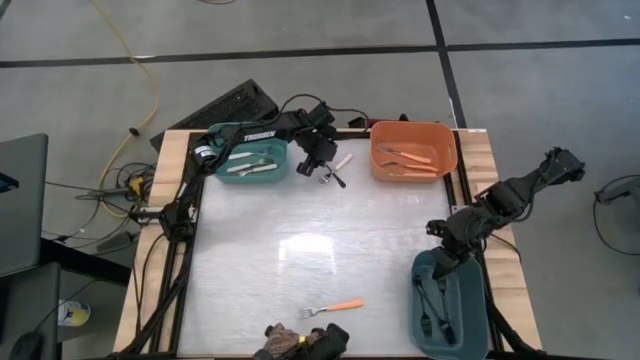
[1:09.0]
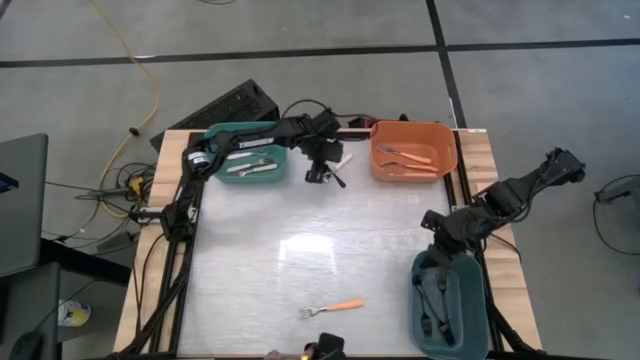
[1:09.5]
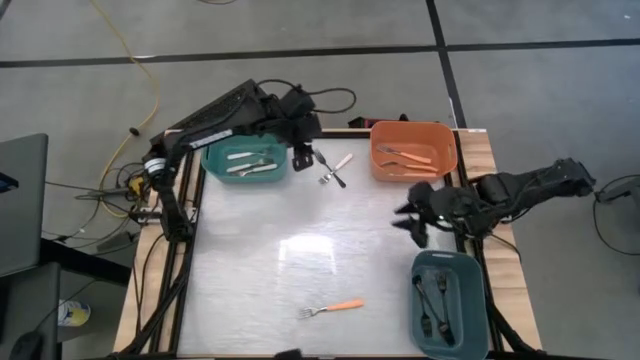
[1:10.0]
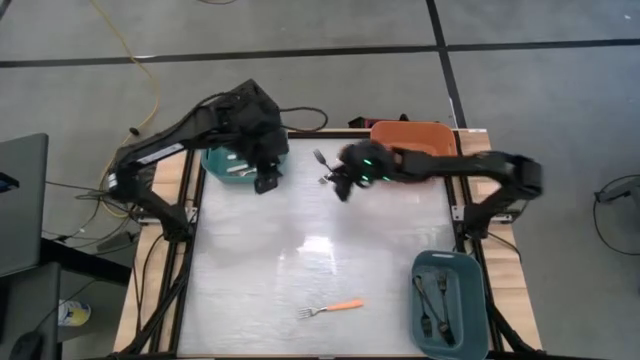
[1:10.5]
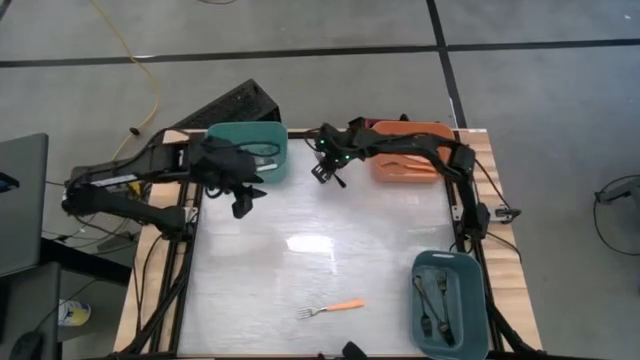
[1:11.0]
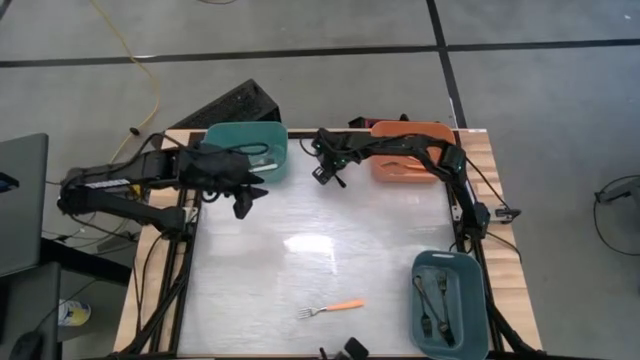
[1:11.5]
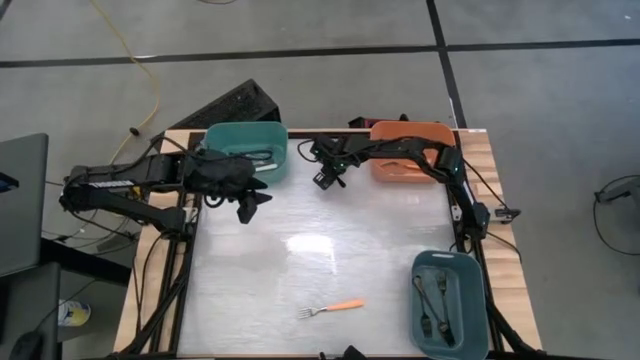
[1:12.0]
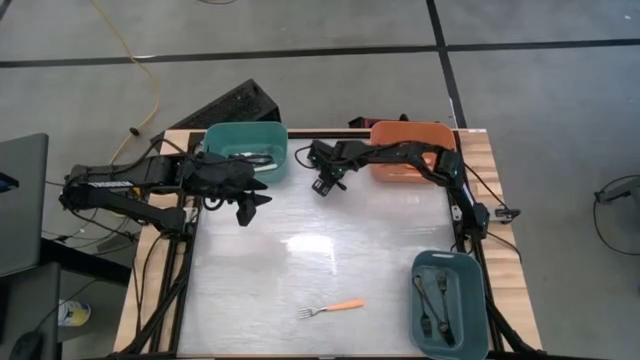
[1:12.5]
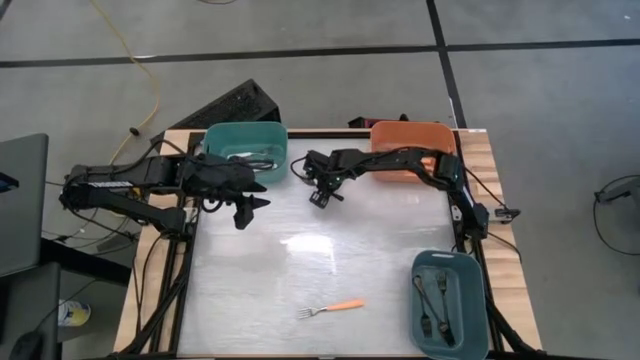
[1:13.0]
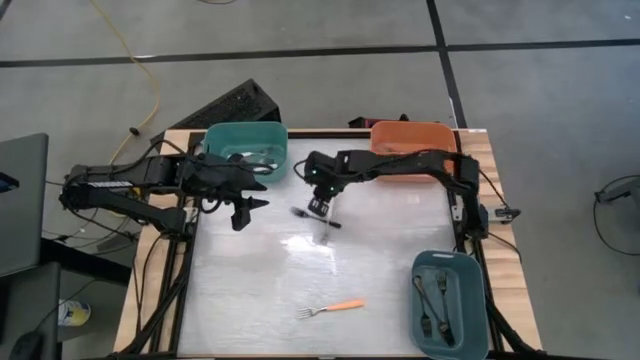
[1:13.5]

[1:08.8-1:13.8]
Task: Sort silverware by color (type)
Put the black fork into the blue bin

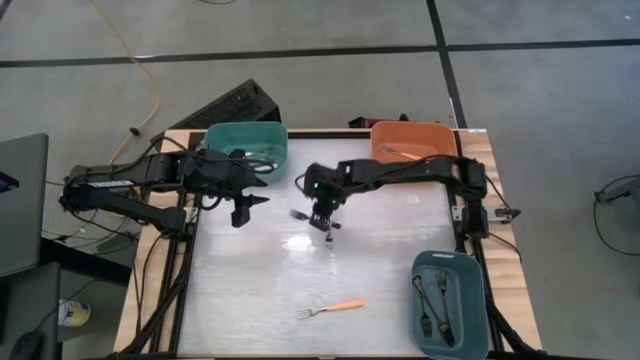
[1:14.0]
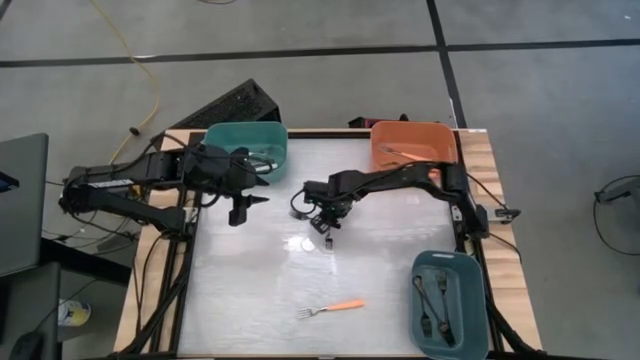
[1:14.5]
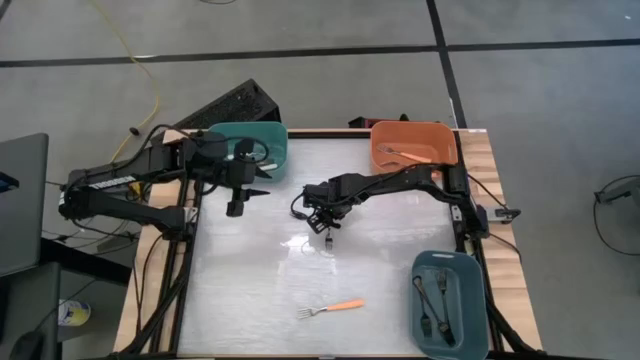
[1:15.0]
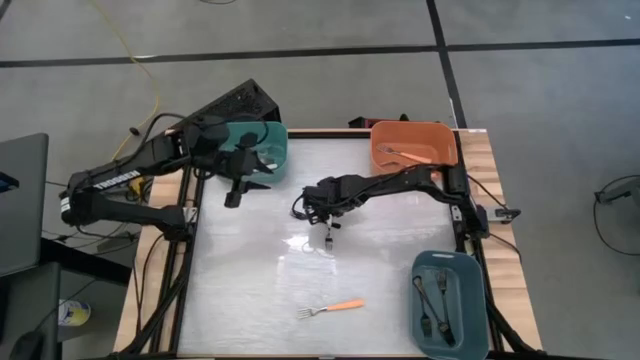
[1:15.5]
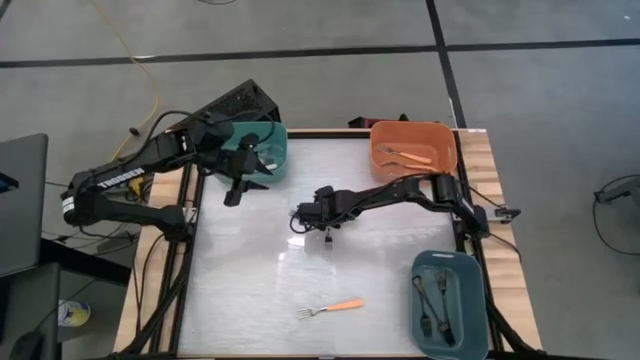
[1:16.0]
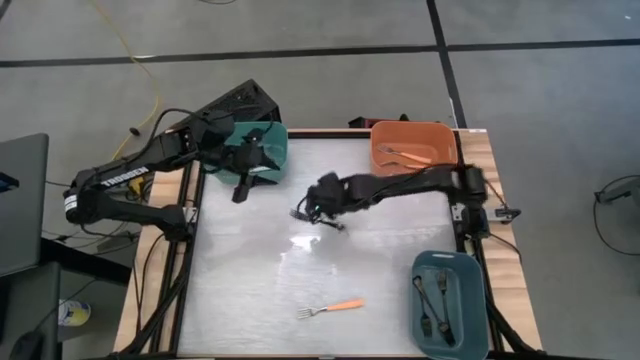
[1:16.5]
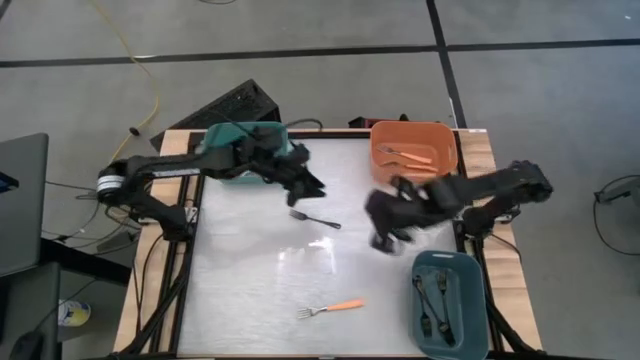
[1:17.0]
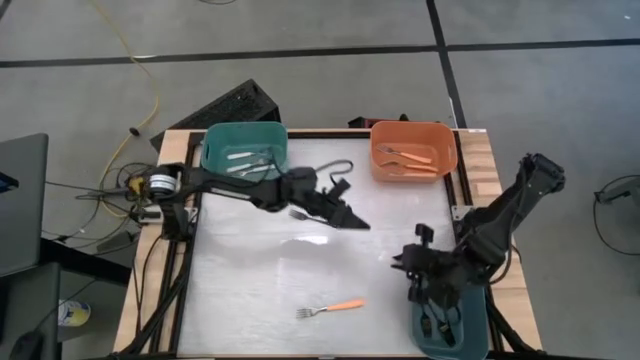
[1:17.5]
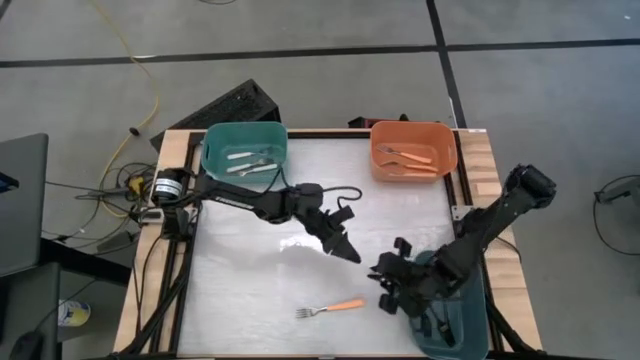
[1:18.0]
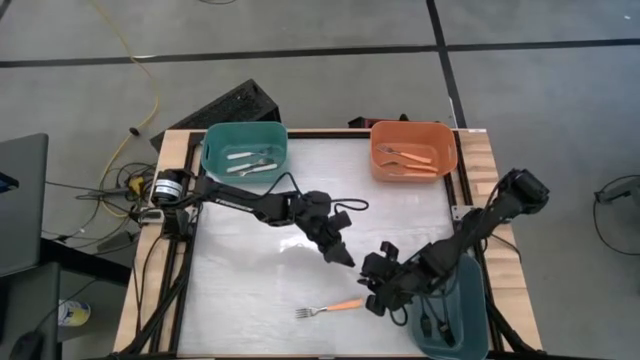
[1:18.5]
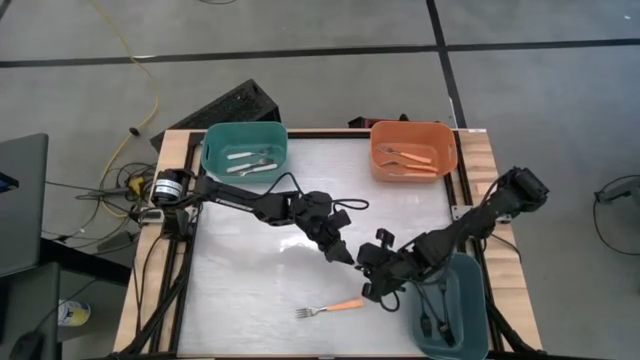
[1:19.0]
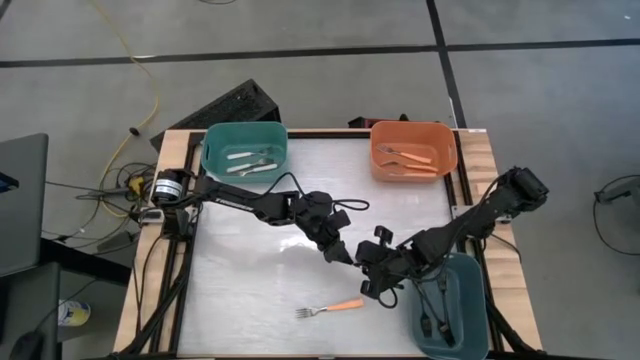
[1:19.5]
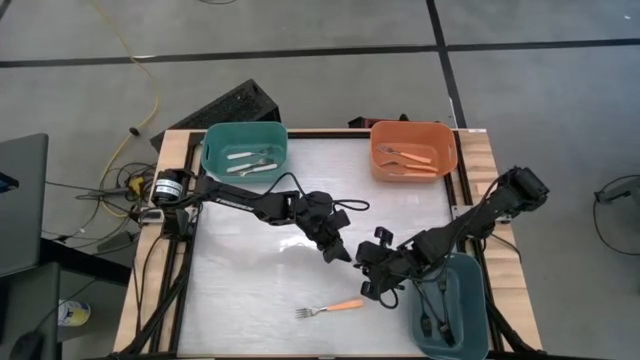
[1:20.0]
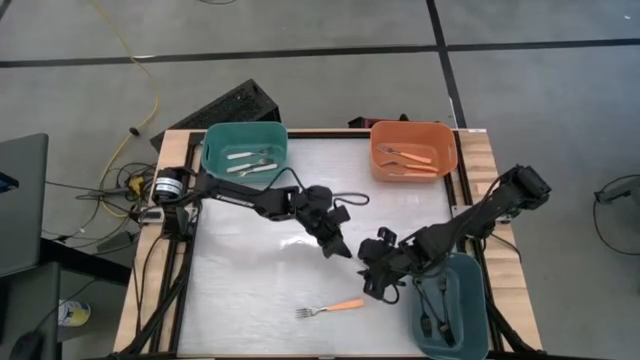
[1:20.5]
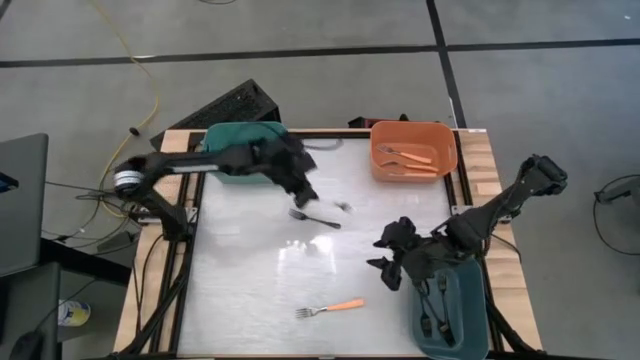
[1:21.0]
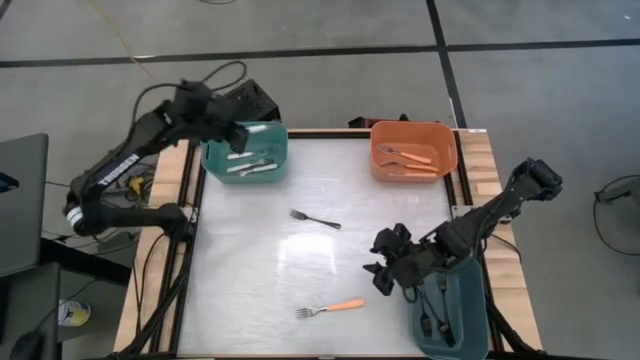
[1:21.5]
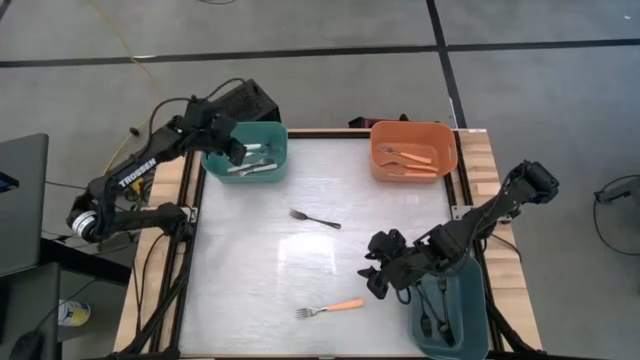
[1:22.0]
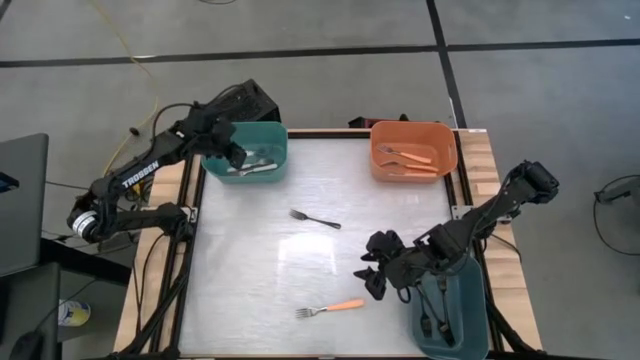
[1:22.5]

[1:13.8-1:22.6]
Put the white fork into the green bin

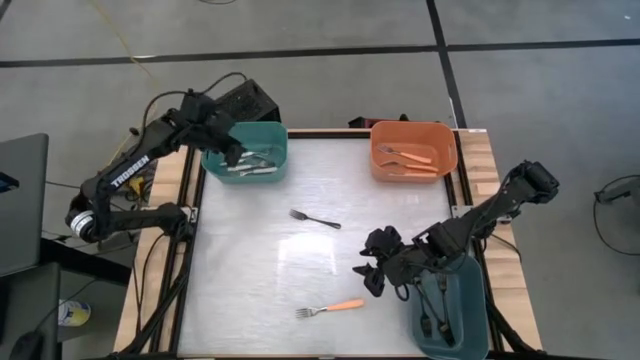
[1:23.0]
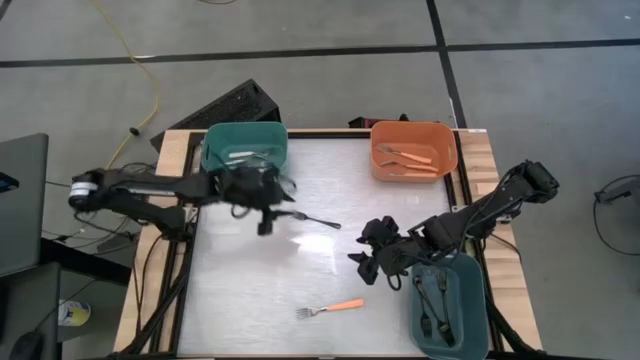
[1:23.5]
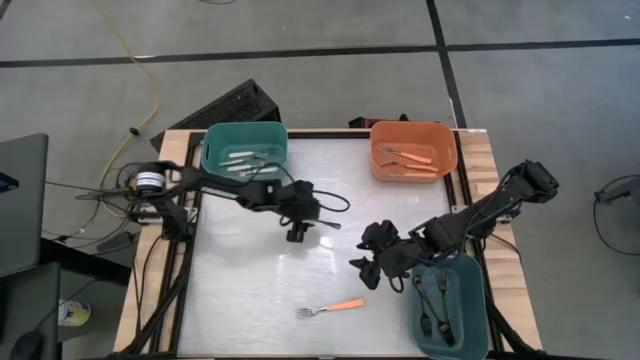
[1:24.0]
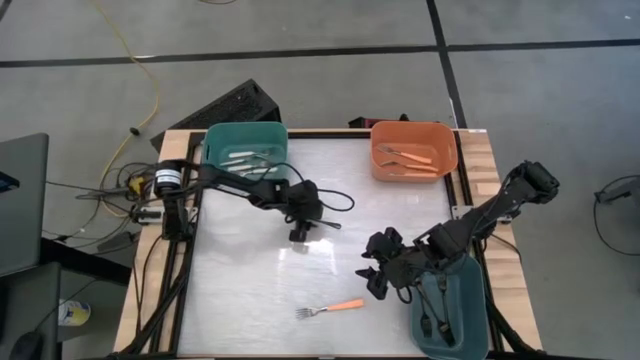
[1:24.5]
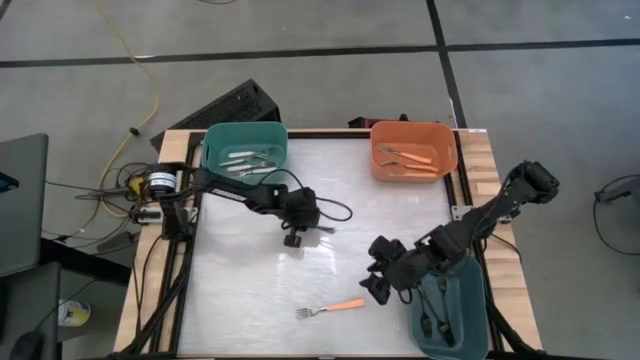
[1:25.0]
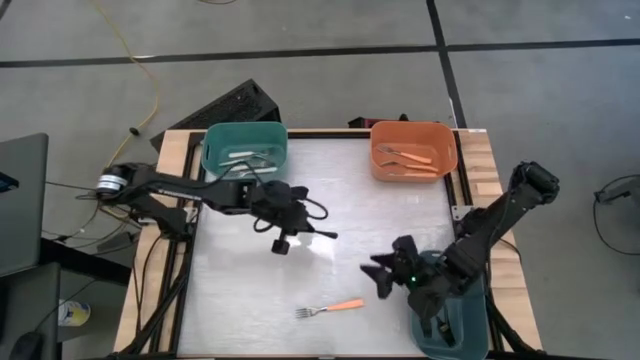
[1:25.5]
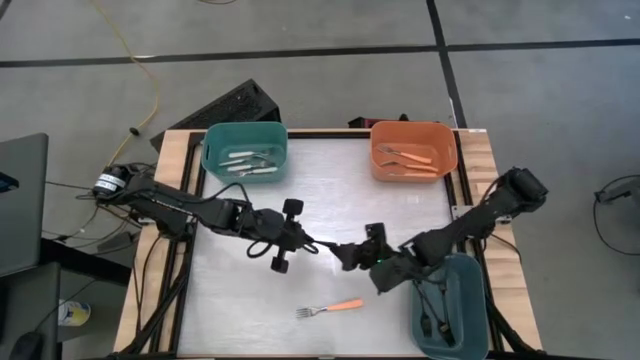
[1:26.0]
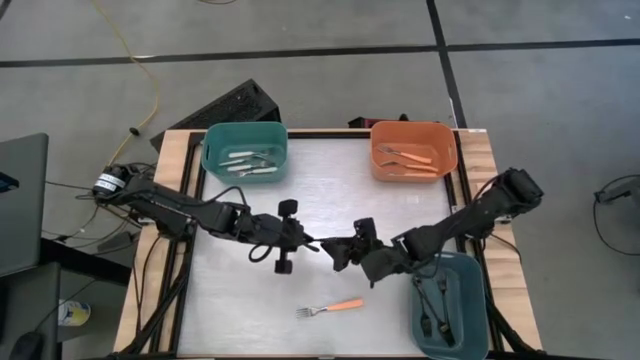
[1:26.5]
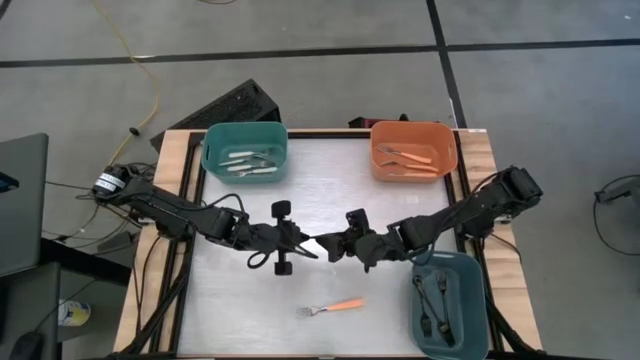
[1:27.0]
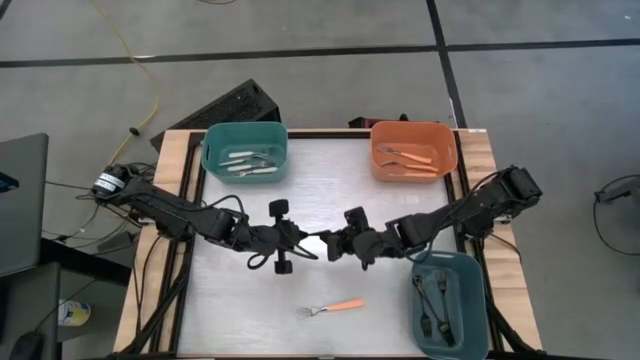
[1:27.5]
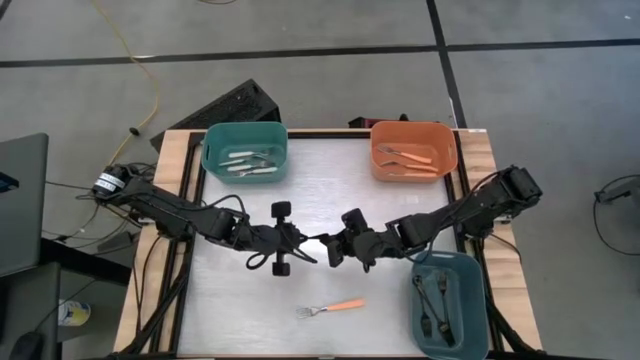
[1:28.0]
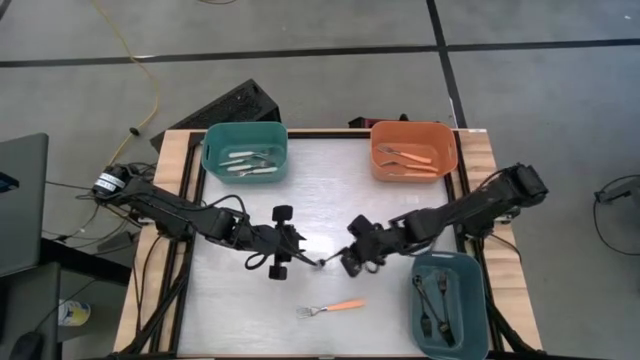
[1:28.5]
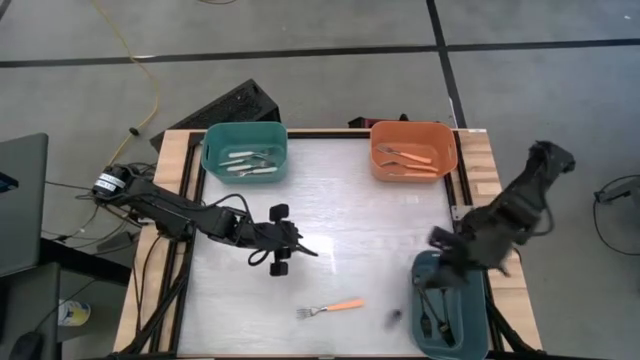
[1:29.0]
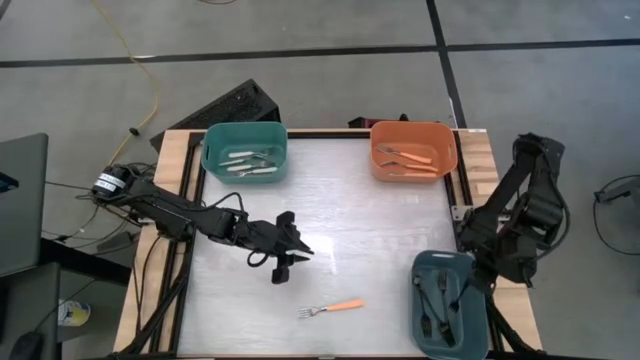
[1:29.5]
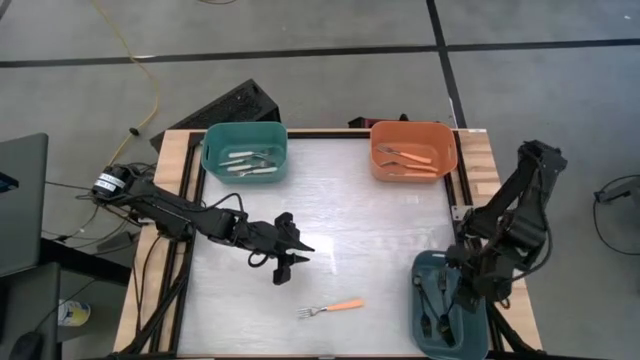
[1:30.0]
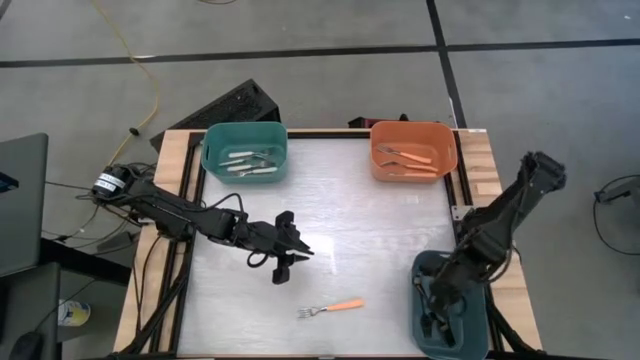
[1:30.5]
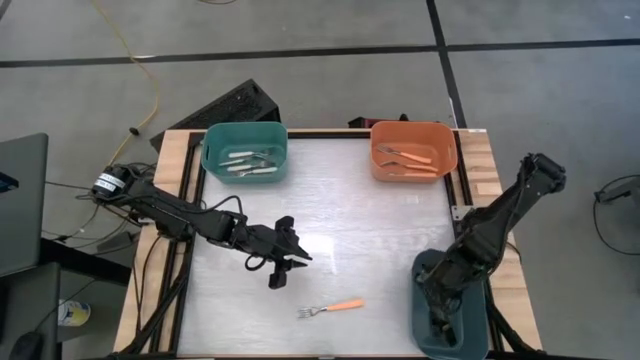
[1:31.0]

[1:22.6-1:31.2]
Put the black fork into the gray bin
